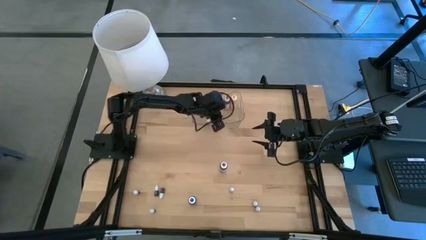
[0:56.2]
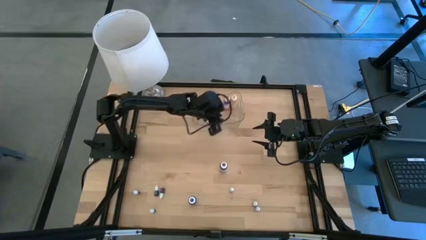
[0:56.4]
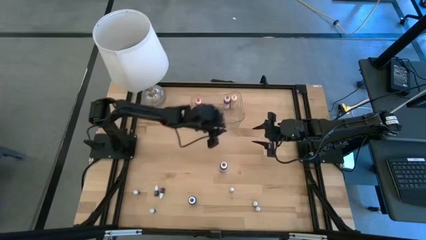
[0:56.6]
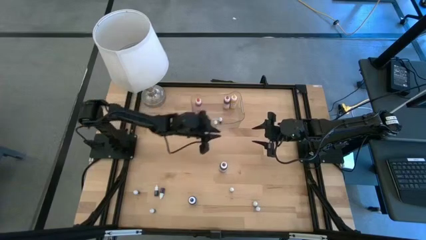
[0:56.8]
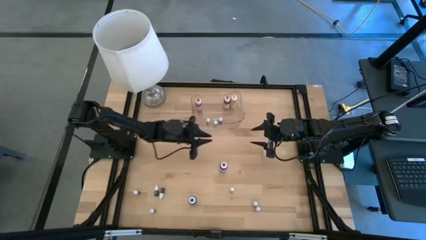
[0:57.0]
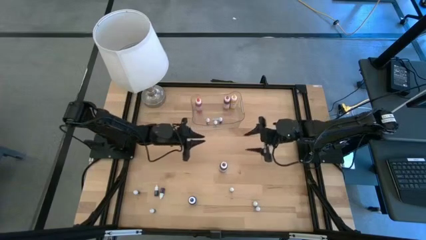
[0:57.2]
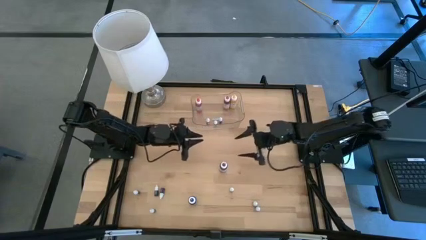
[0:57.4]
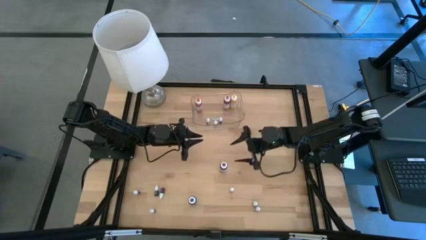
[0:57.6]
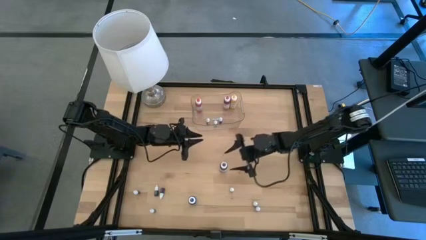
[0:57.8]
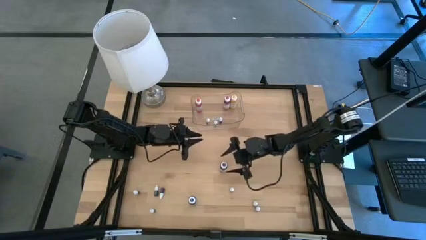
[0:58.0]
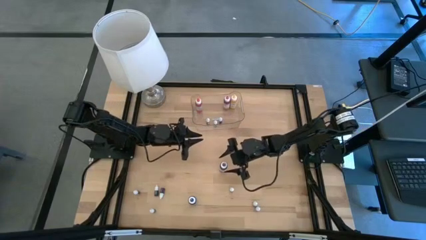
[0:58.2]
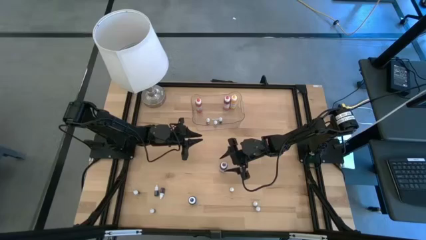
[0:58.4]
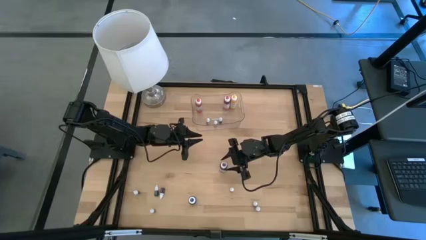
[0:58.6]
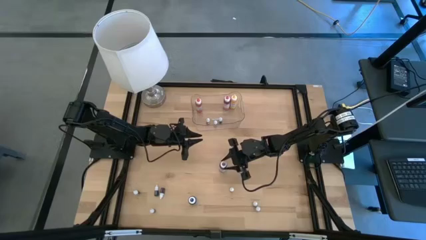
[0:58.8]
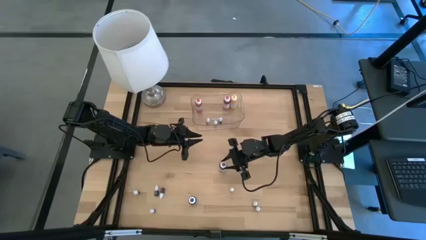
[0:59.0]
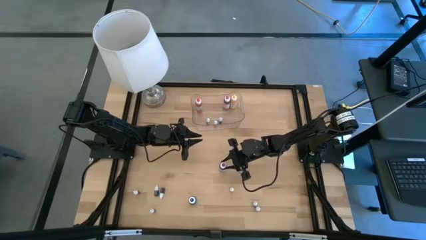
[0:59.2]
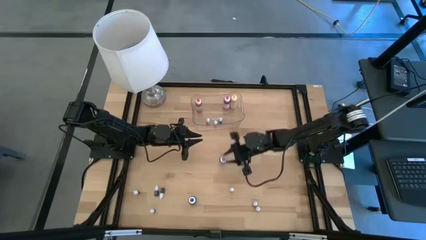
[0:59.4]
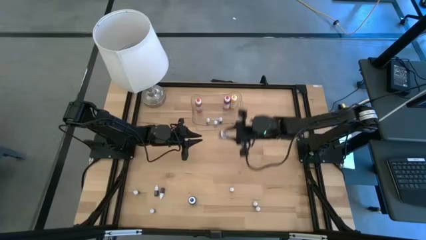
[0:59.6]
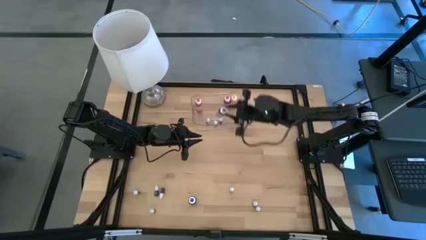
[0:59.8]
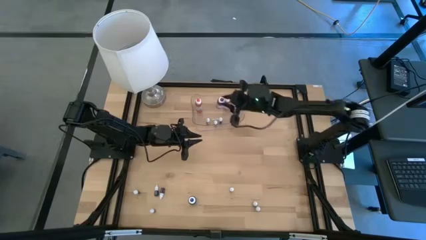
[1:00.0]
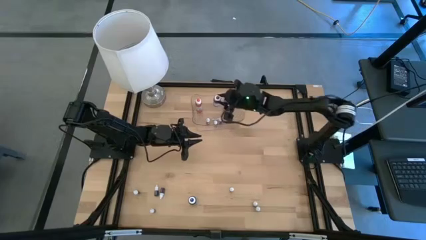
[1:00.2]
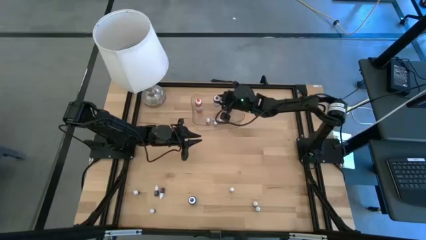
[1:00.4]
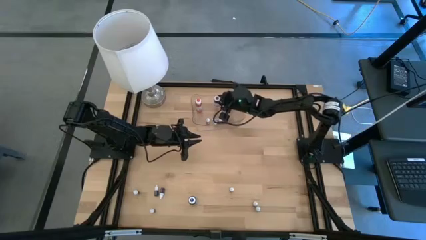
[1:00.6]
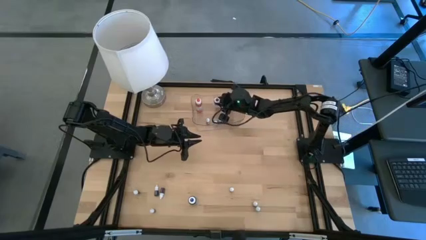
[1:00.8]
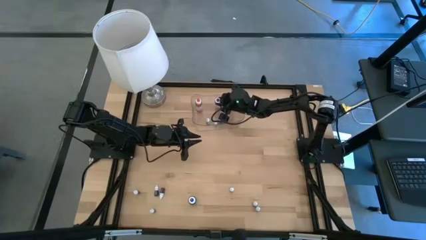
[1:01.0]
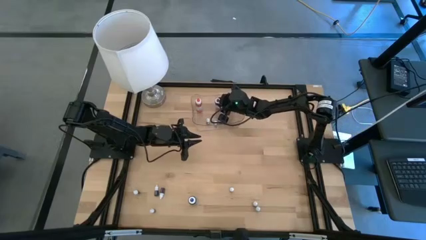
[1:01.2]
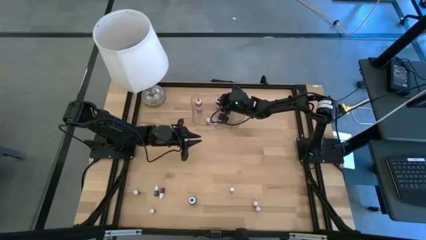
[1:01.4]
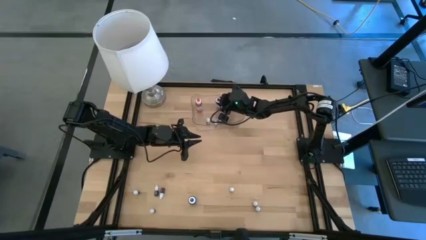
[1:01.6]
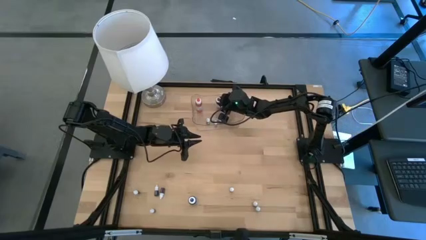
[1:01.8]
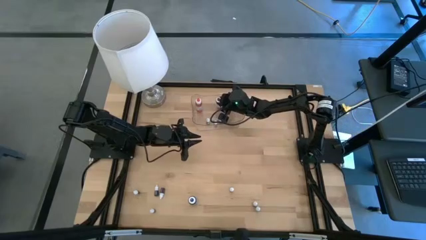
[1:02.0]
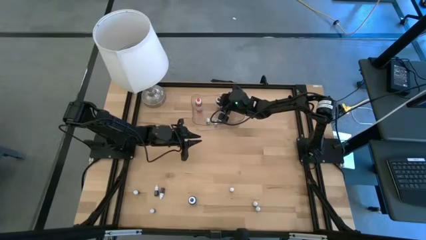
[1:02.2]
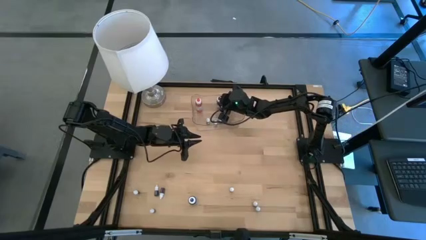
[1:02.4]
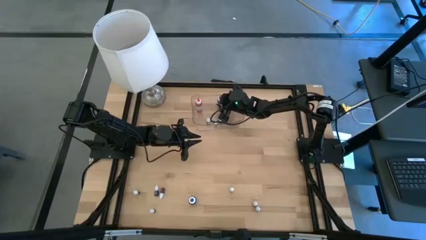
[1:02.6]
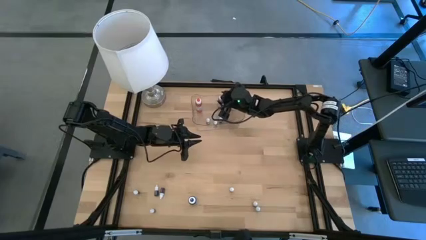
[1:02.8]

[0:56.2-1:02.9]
Task: Pick & Place food coloring
Put the large violet food coloring bottle into the transparent bin

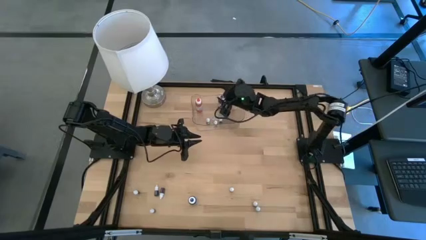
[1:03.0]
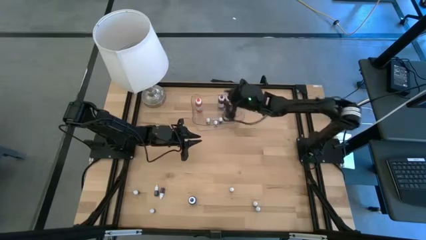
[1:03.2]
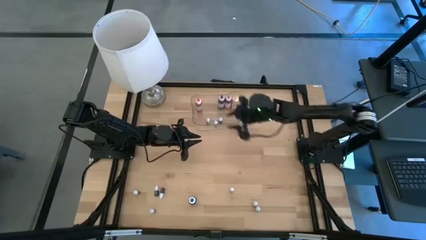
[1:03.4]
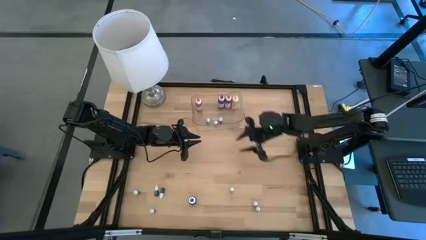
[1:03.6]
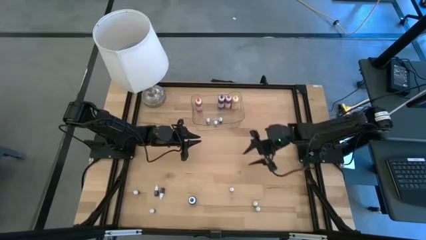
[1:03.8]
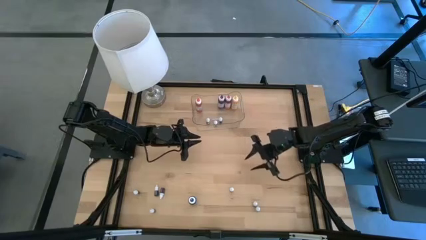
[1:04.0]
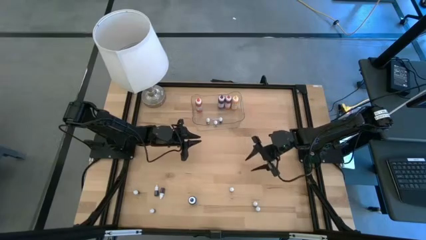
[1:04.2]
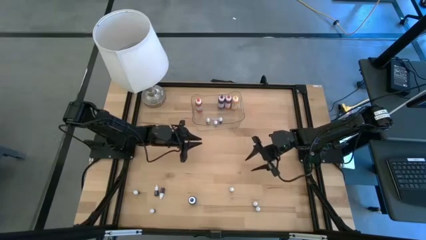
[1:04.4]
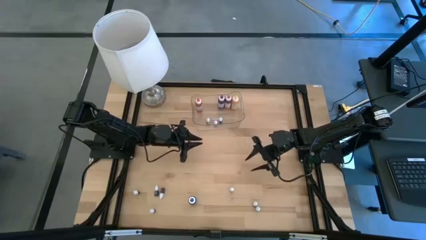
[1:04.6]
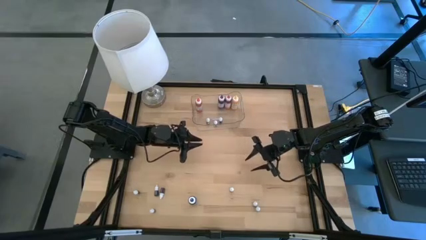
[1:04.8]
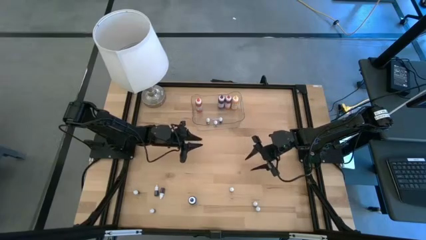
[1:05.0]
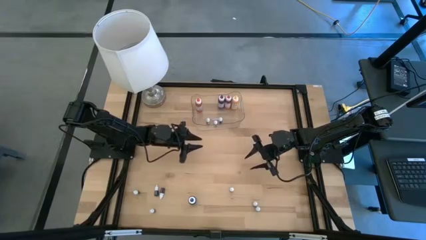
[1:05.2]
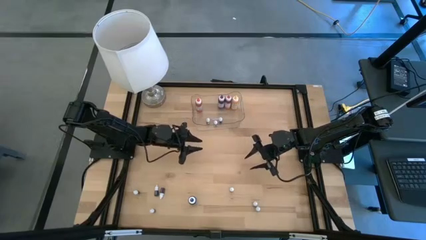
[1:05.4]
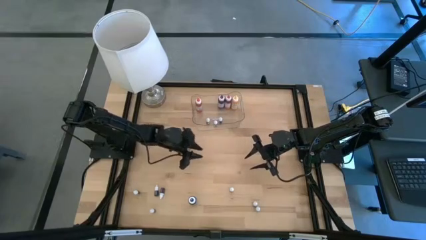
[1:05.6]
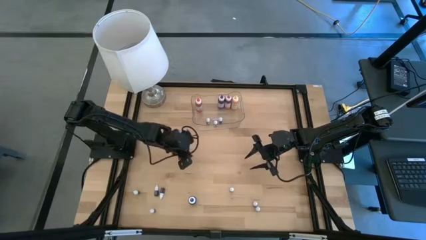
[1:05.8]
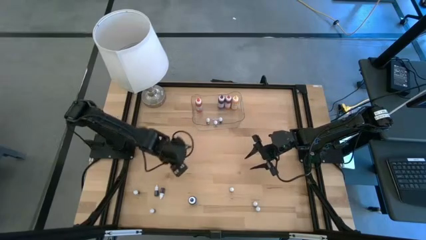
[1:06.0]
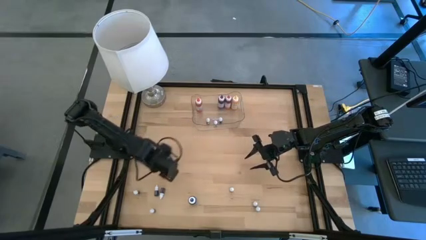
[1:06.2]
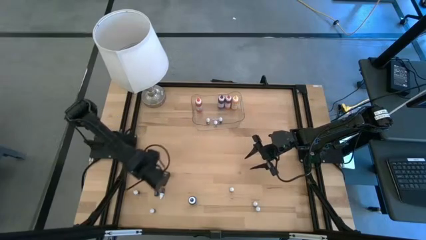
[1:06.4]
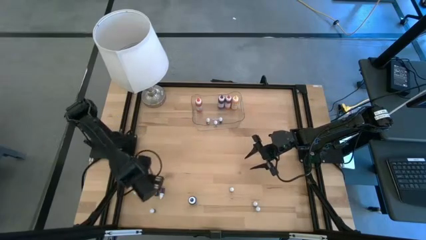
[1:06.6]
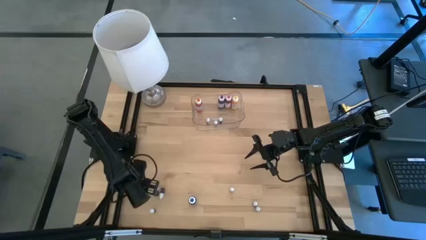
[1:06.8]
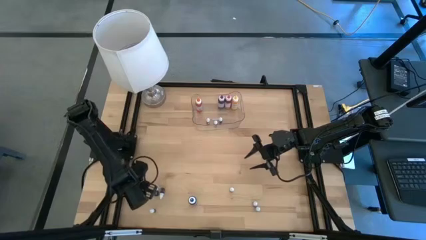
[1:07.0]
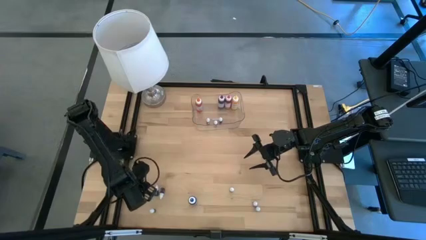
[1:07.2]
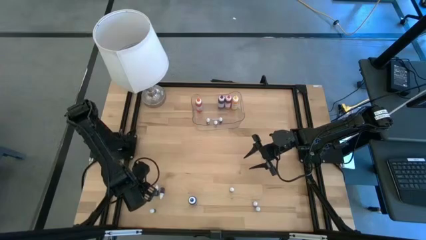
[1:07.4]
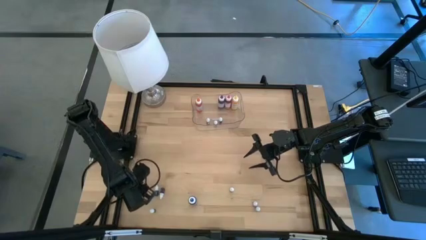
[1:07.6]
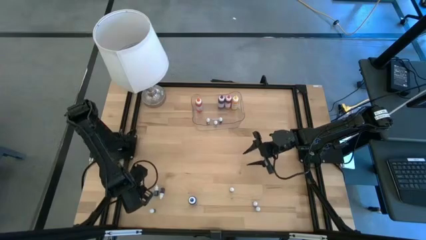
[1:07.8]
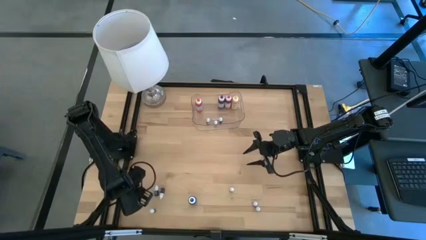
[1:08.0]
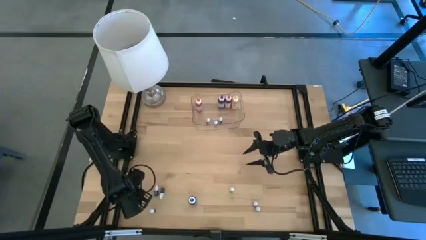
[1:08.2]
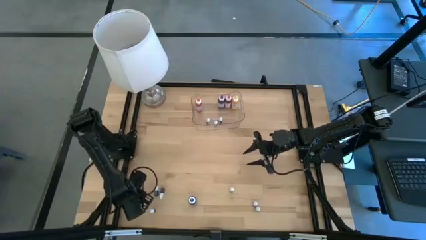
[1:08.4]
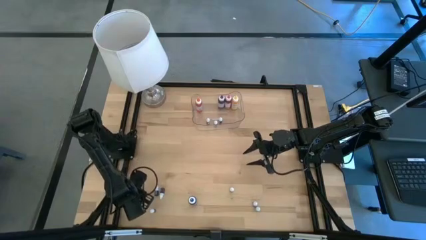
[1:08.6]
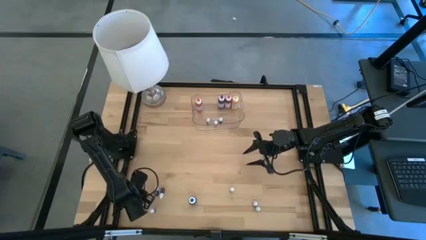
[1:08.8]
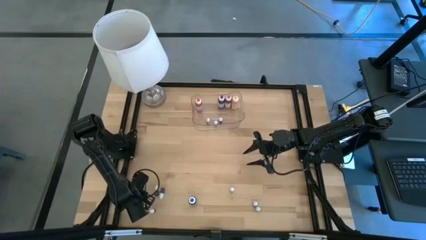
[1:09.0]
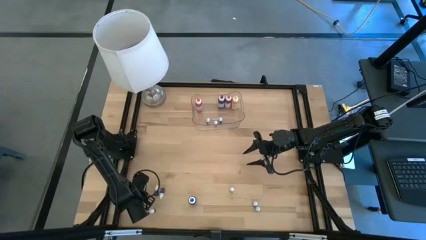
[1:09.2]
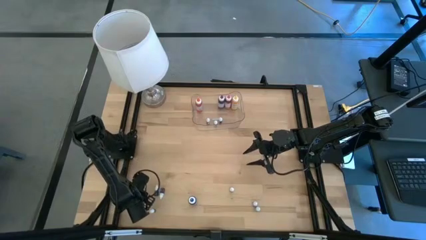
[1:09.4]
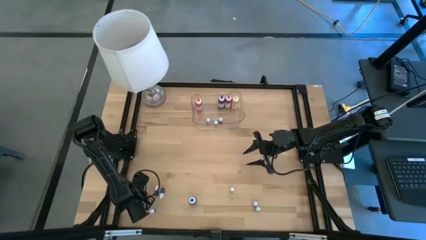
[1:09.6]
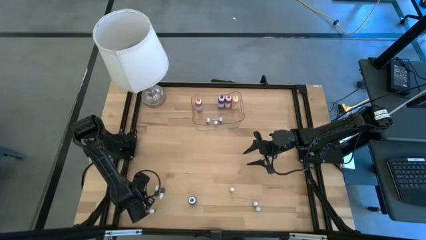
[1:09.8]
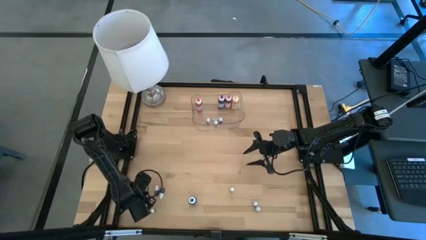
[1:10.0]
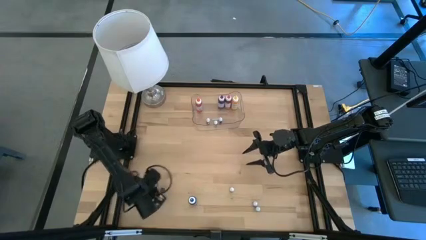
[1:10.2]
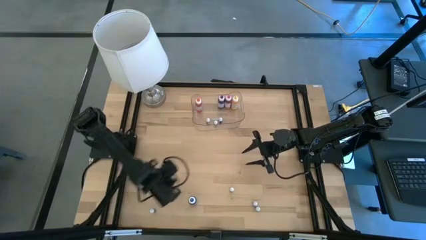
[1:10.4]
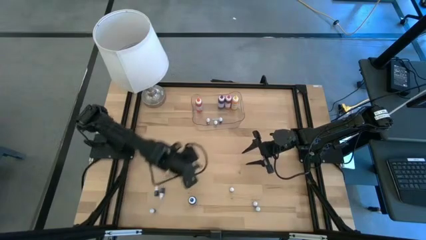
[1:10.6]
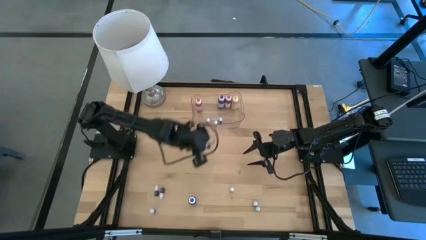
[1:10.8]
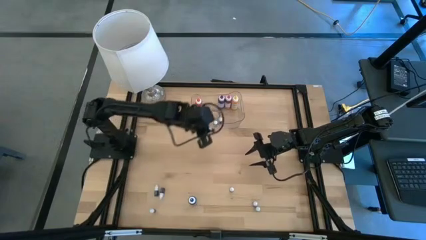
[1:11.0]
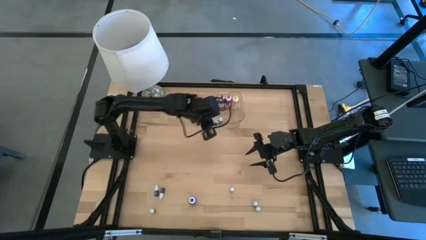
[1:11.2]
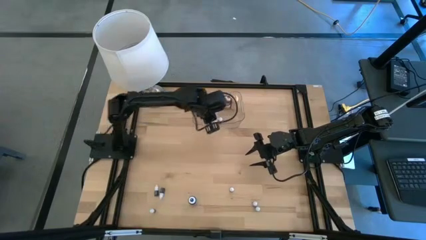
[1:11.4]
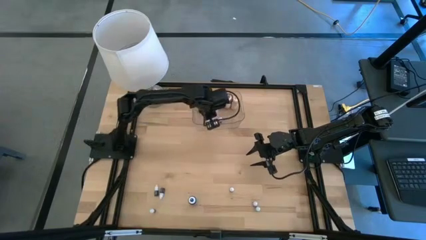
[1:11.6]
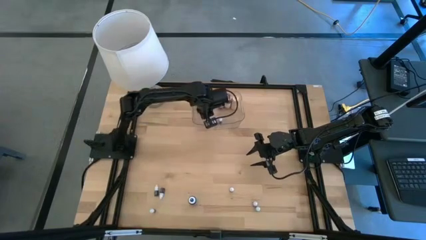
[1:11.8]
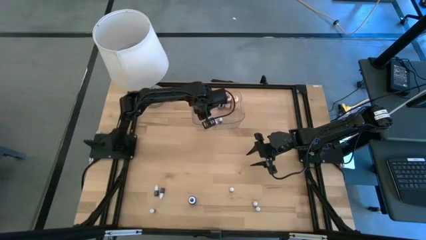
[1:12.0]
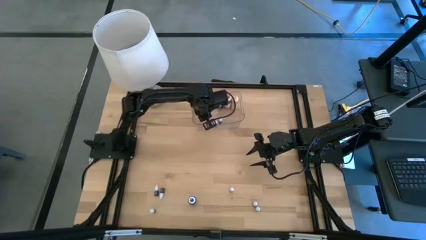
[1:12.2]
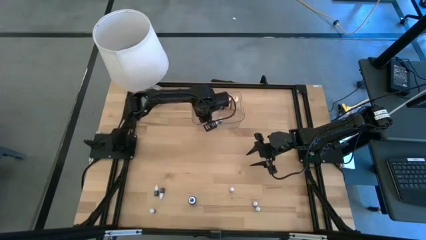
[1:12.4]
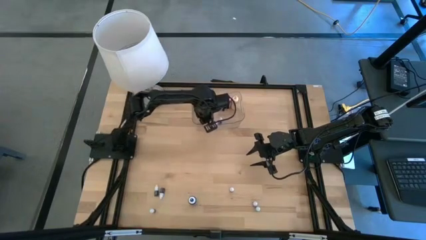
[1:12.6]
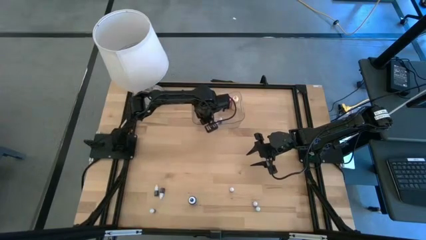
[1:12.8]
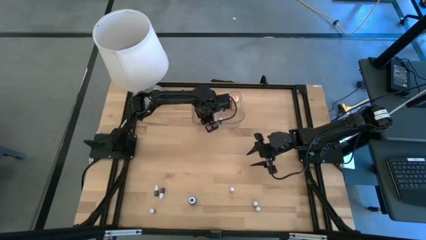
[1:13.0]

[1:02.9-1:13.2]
Put the left small blue food coloring bottle into the transparent bin

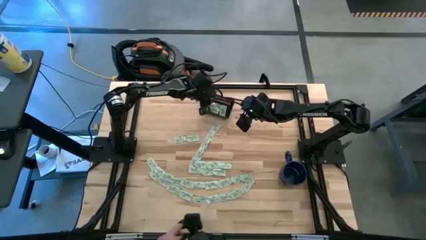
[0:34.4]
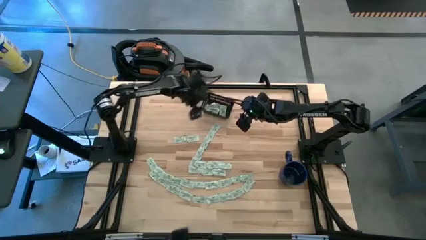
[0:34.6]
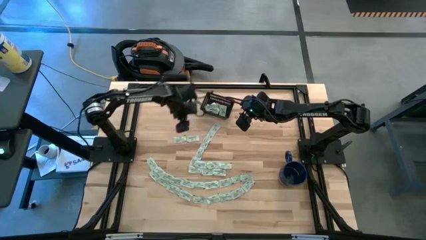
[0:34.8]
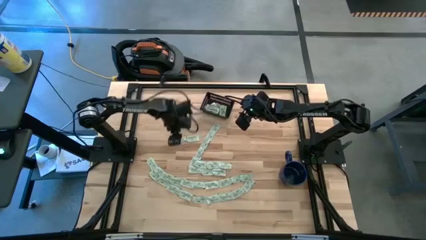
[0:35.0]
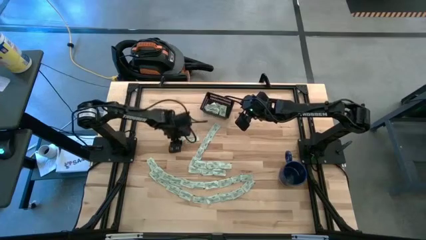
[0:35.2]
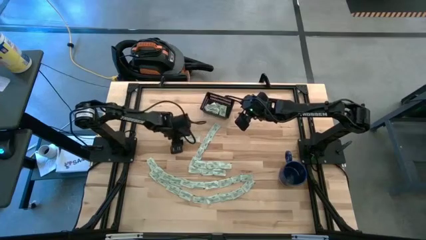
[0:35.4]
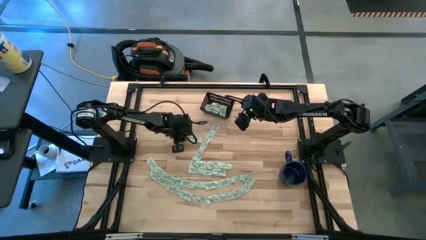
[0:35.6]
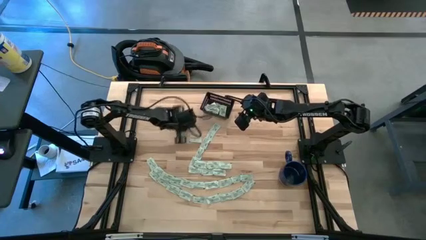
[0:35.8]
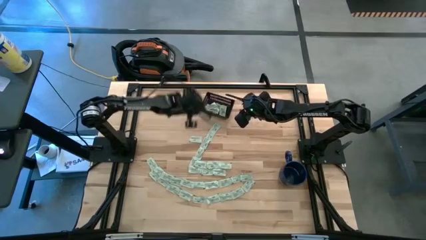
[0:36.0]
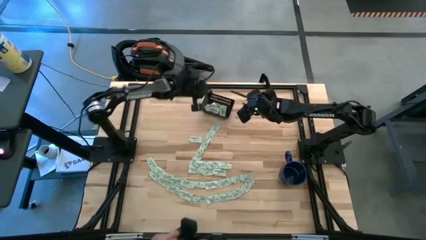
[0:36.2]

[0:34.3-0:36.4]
Task: Pick and place Stevia / Truvia into bins
Put the stevia packet into the black bin
